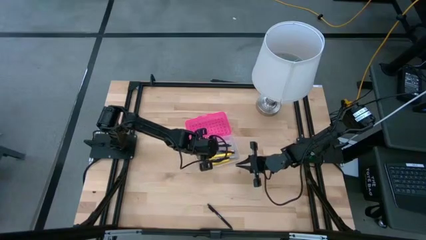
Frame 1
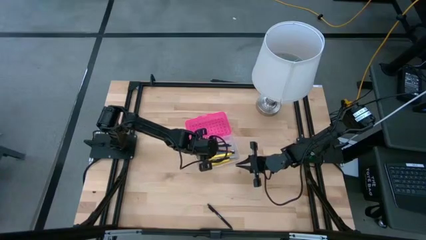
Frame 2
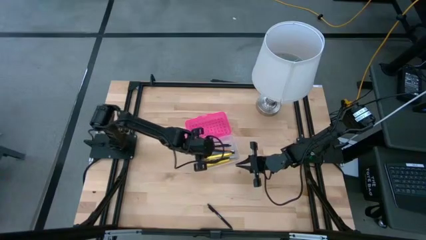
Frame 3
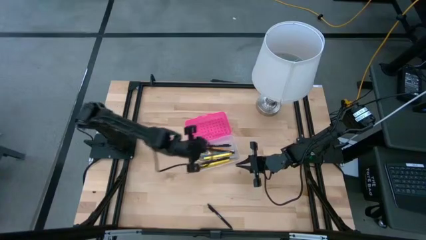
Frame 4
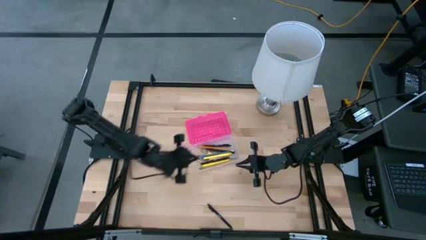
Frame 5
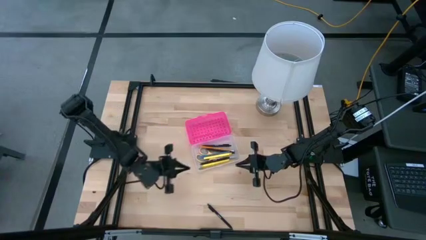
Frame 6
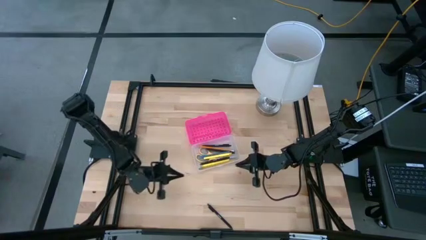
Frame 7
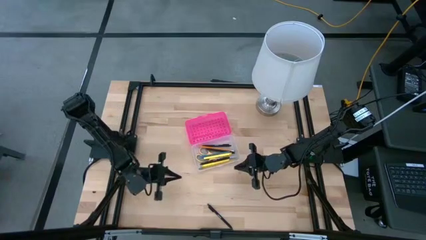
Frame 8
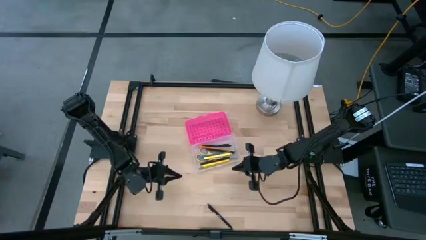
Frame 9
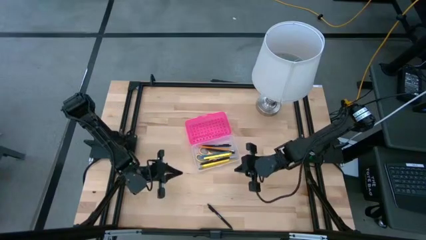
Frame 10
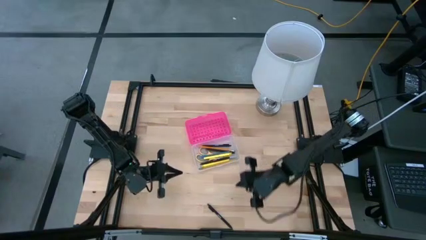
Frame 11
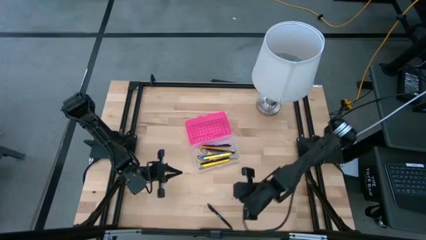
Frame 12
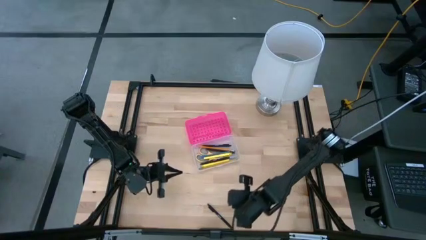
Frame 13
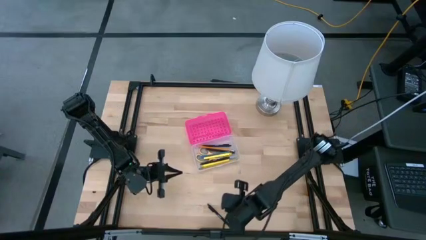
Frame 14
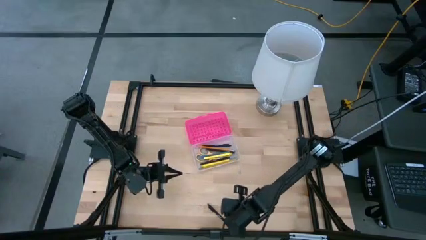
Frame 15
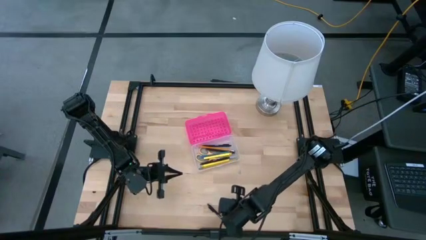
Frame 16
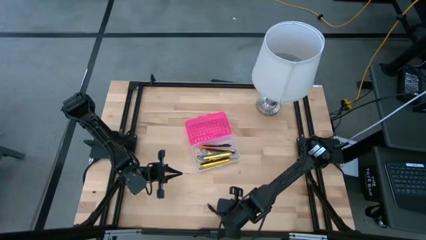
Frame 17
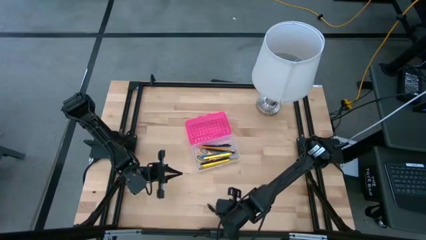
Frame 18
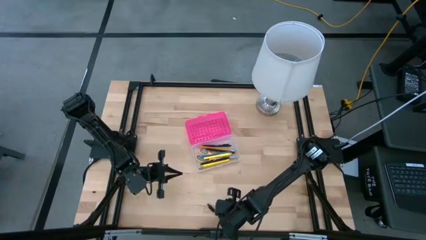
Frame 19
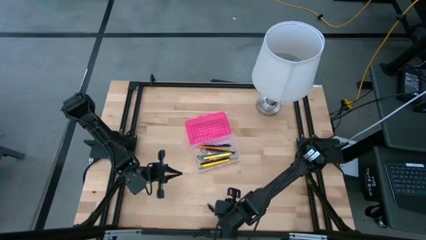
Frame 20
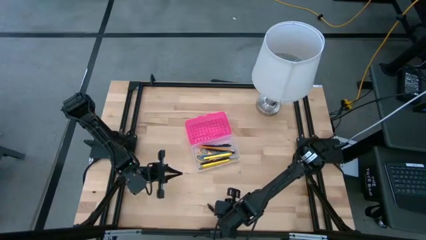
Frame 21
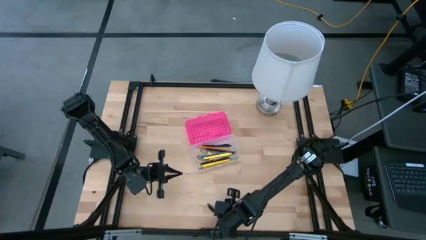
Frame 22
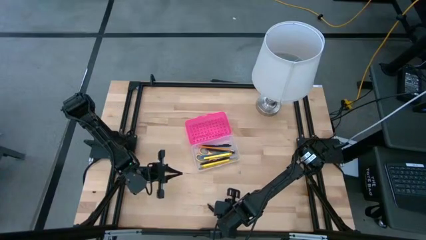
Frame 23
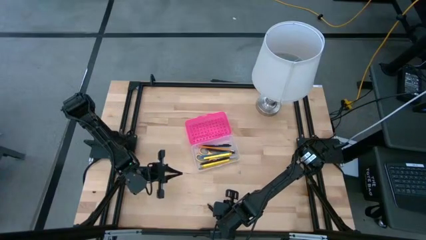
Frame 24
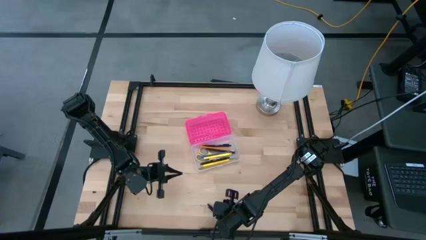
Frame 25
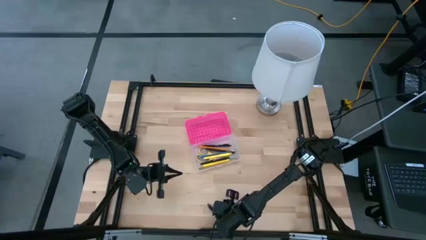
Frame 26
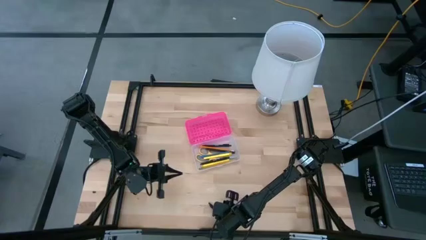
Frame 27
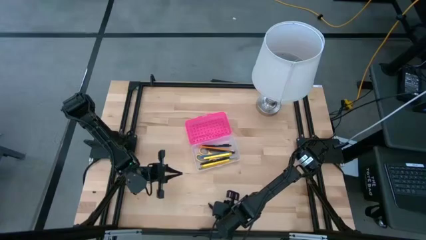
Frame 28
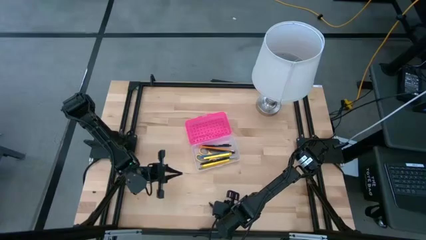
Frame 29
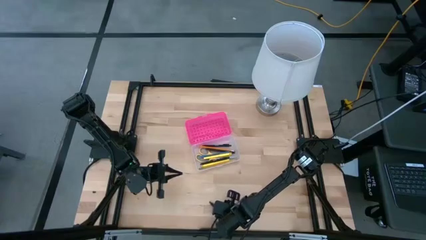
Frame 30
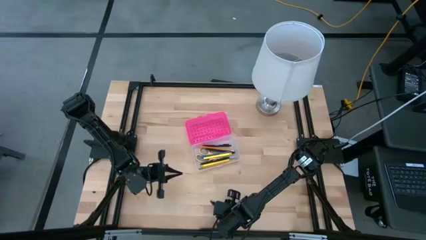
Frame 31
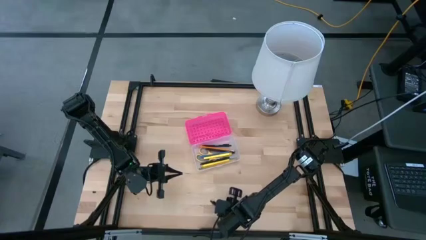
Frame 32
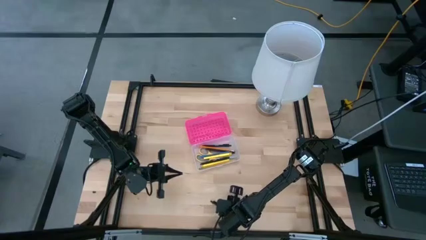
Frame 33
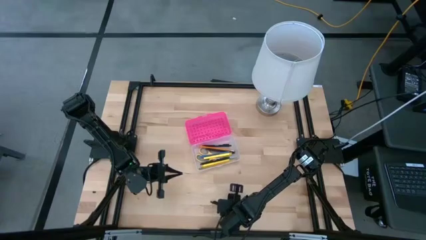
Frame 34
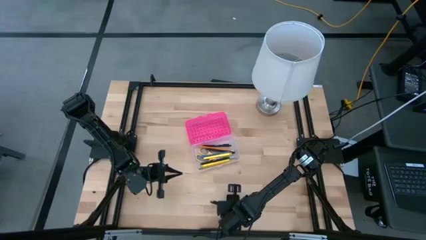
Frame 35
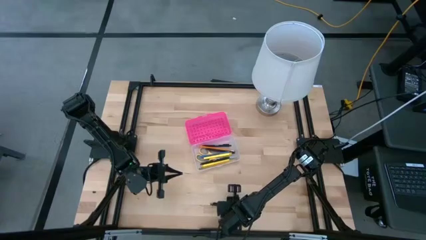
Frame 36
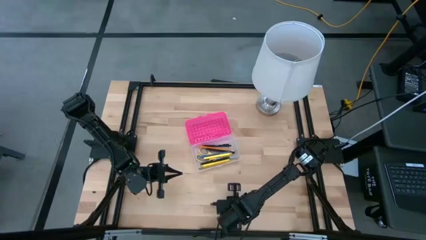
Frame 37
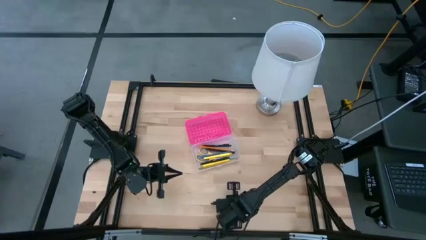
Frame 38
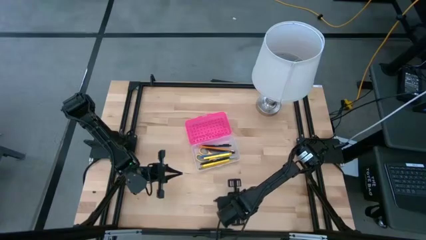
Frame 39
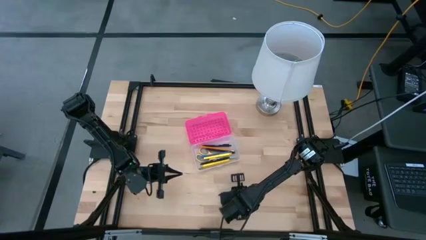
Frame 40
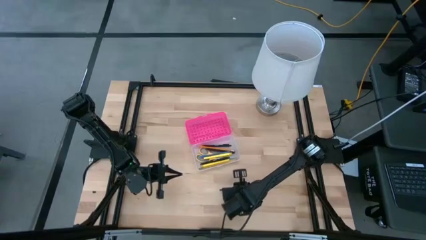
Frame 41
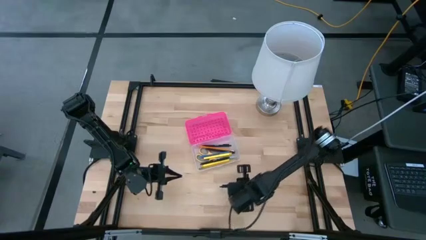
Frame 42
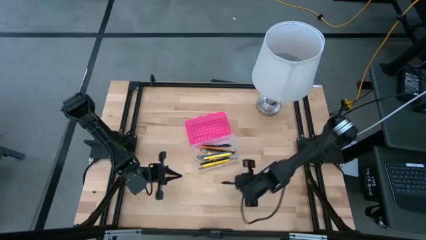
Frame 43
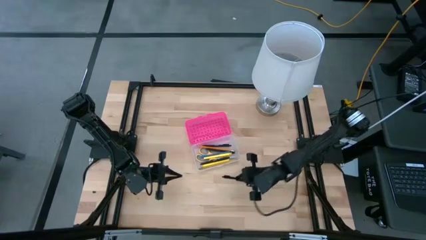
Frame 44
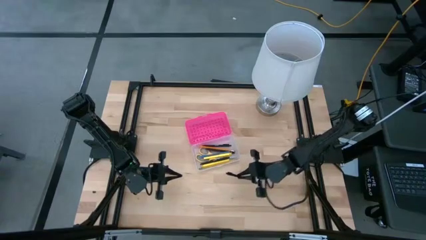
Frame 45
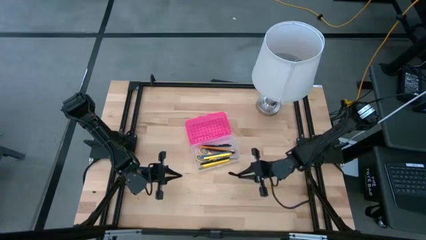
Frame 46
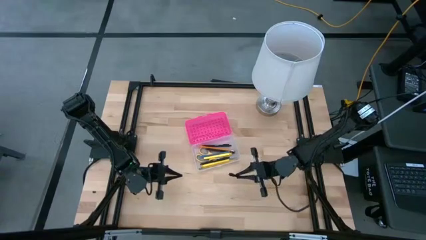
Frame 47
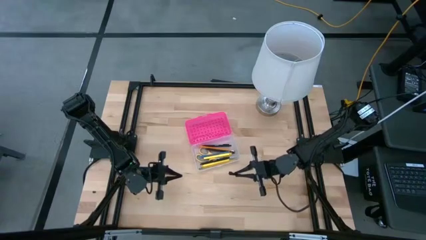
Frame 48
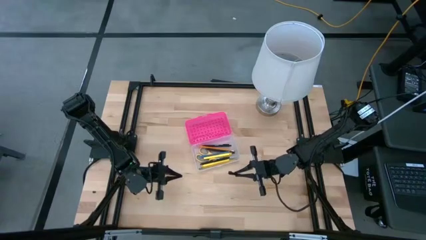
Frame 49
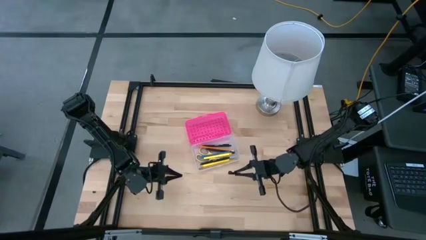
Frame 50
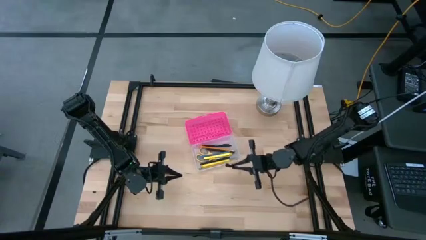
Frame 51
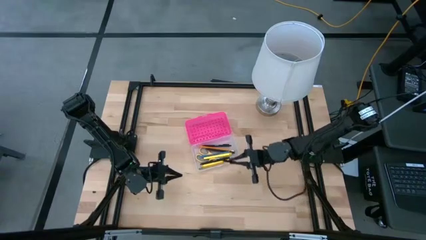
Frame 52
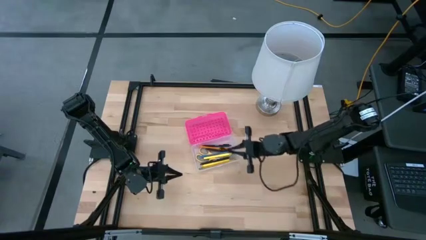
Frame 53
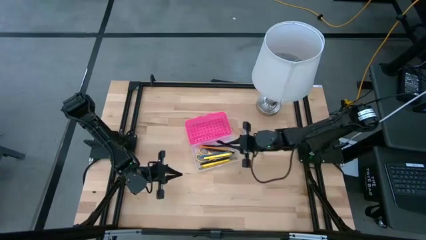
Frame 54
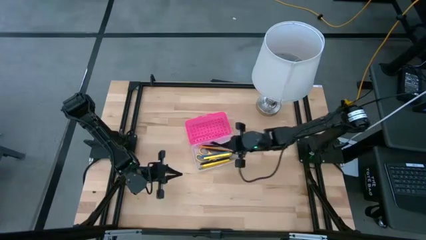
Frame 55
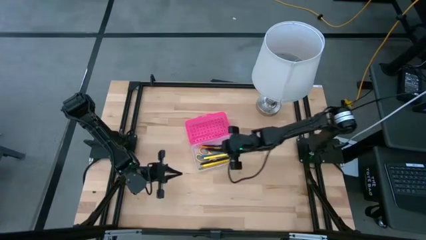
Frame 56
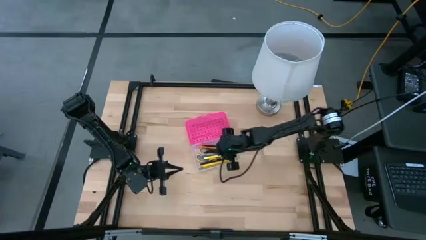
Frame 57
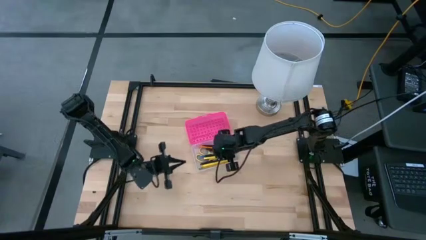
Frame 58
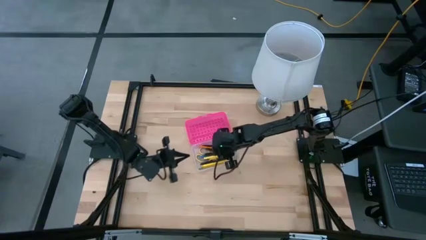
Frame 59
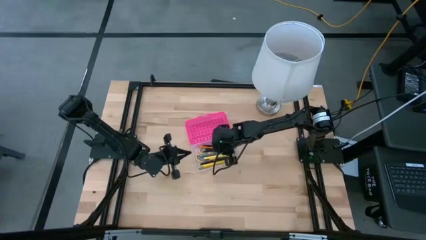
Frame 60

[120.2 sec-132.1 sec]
Task: Pick & place school supplies into a supply box
Put the black pen into the pink supply box

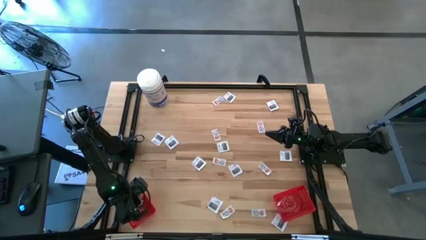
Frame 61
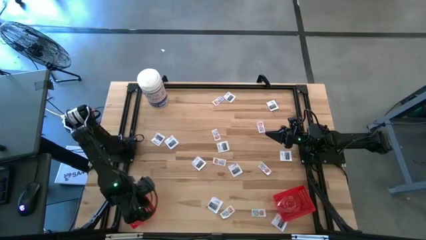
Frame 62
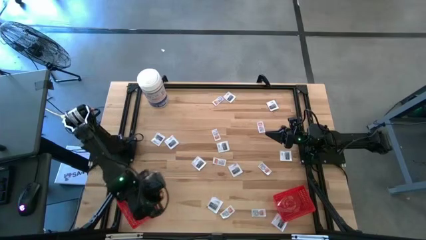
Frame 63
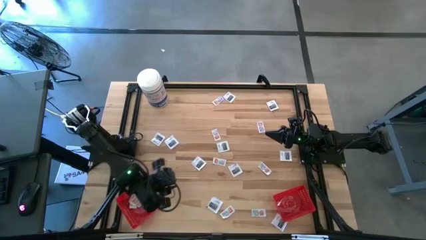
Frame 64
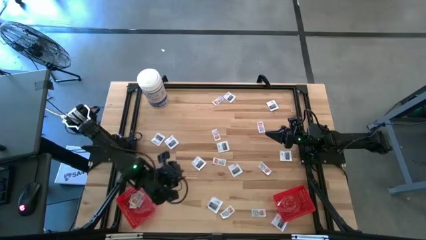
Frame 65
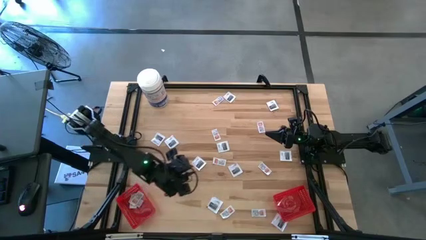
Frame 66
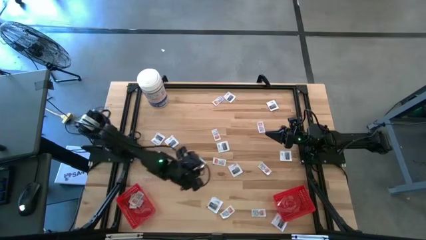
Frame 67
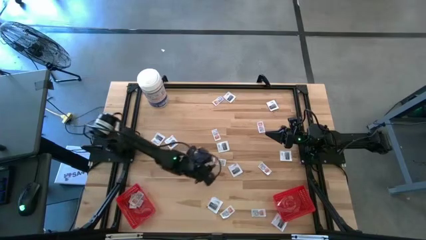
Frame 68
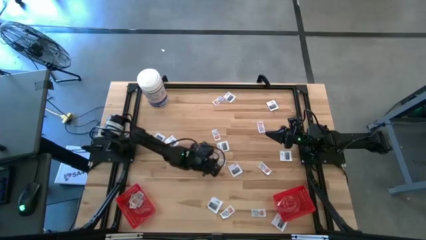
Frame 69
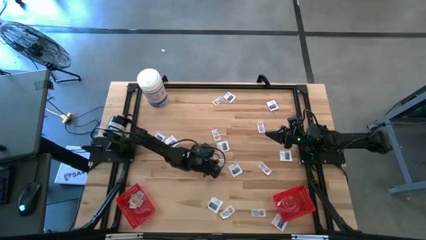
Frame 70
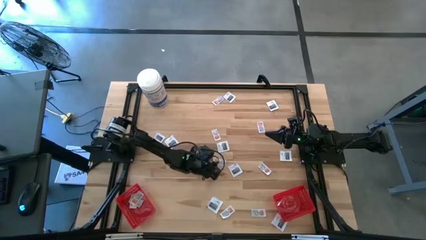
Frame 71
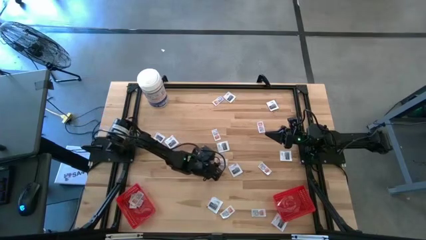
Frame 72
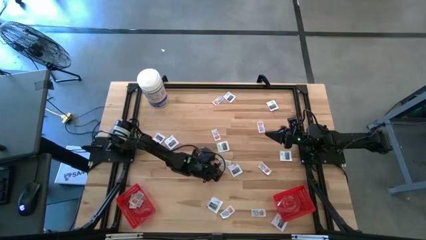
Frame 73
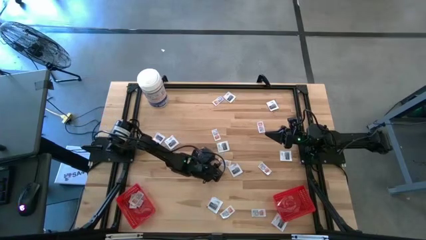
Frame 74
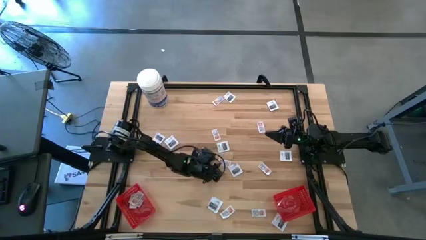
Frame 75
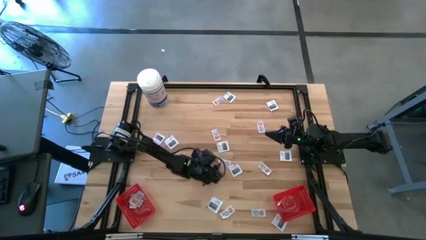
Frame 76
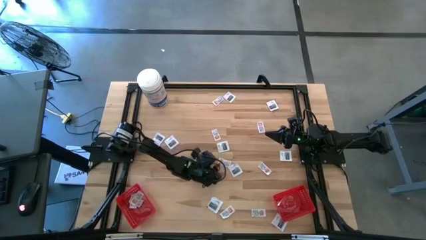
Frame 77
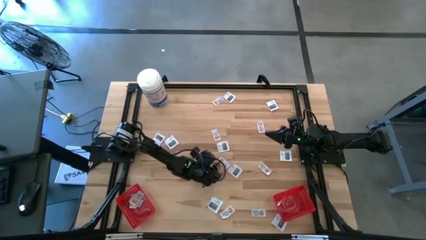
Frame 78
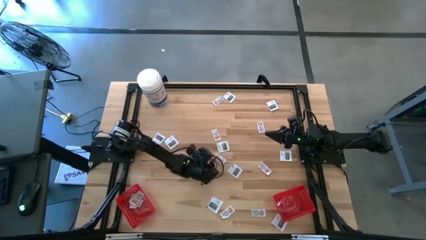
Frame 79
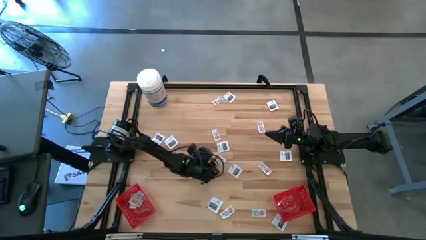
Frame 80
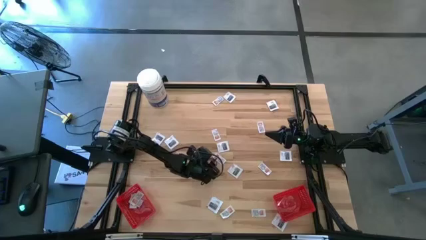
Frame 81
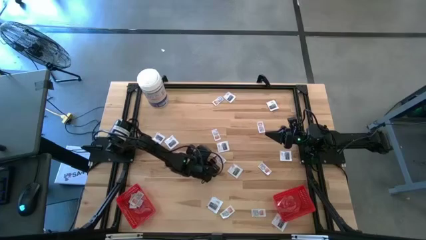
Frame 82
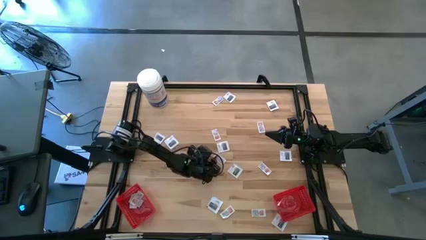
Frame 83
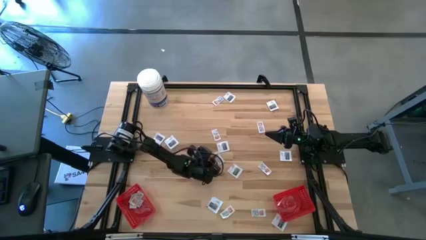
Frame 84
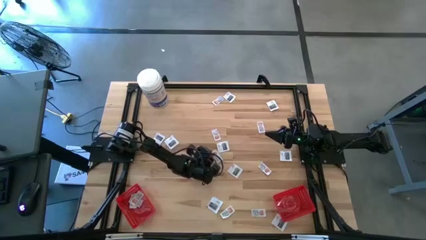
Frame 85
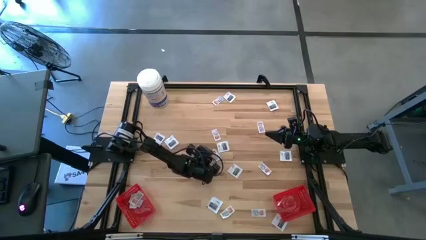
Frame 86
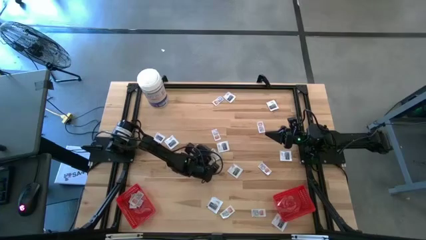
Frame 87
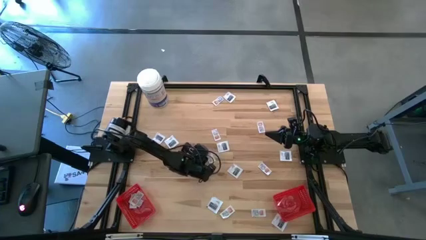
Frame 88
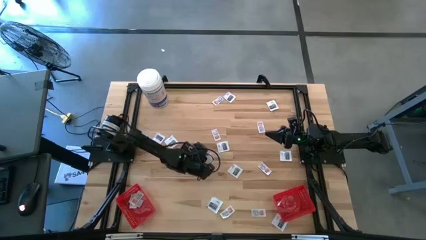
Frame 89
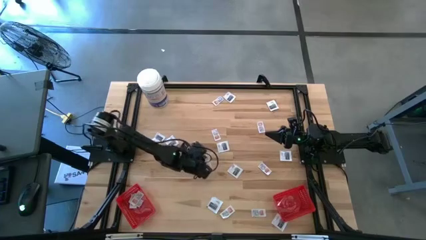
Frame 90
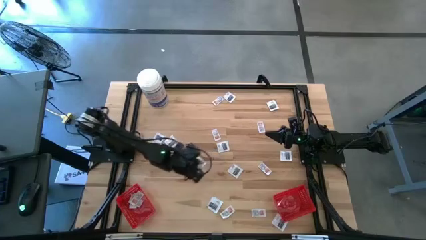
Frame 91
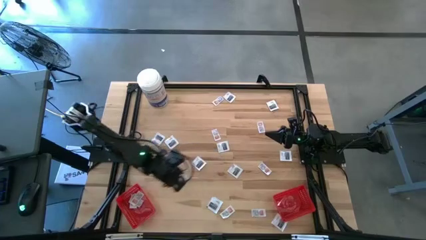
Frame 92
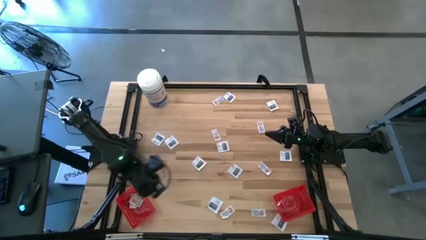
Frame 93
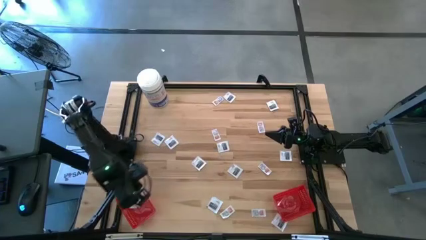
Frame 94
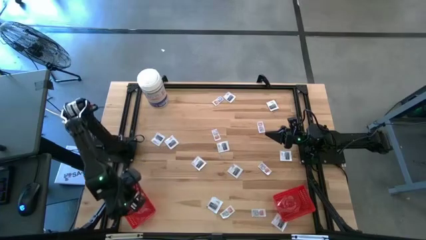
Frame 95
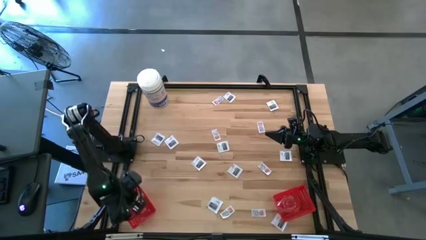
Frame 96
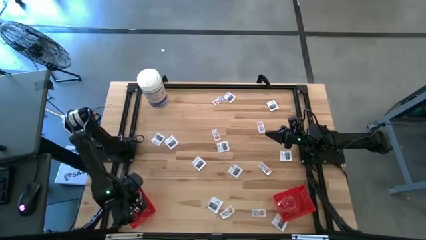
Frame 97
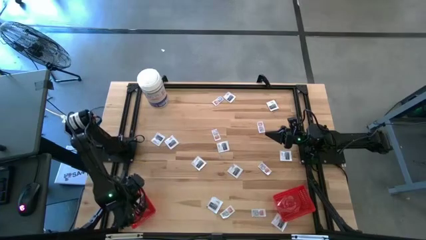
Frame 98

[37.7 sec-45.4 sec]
Task: Pick & Place First Aid Supplies
Put the ointment pack into the left red bin
